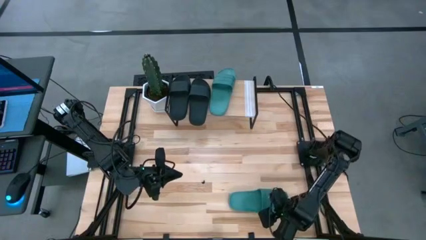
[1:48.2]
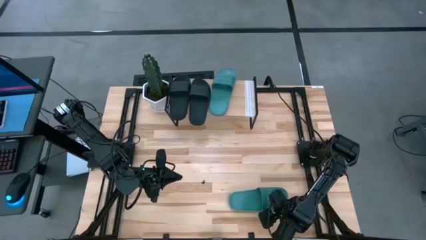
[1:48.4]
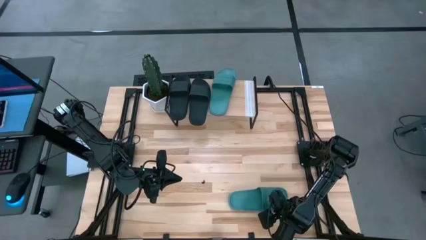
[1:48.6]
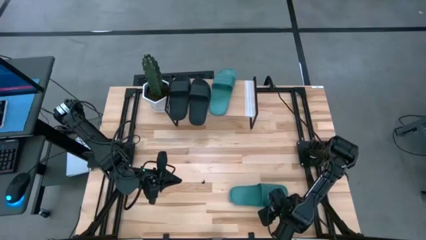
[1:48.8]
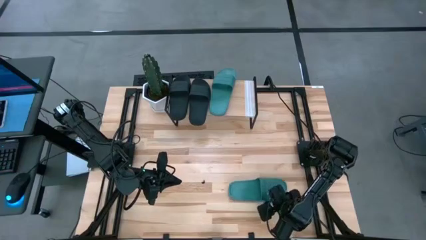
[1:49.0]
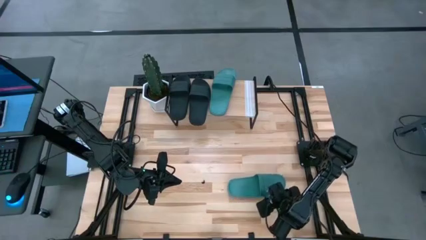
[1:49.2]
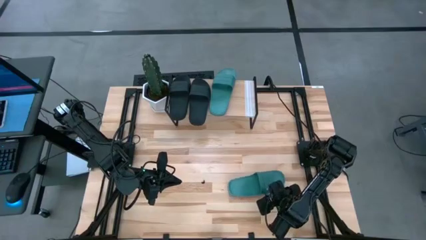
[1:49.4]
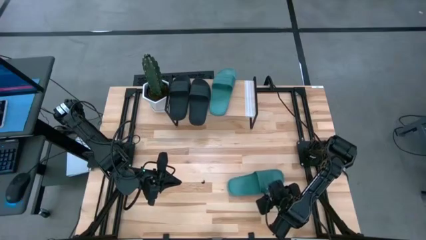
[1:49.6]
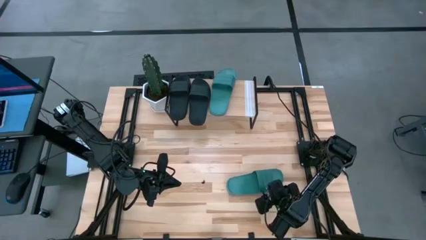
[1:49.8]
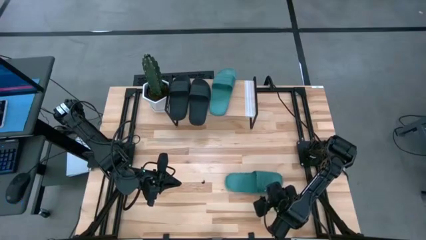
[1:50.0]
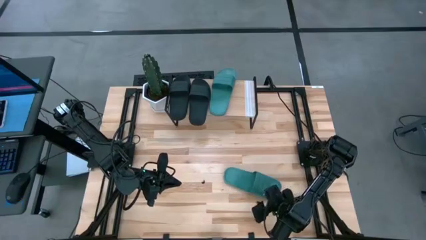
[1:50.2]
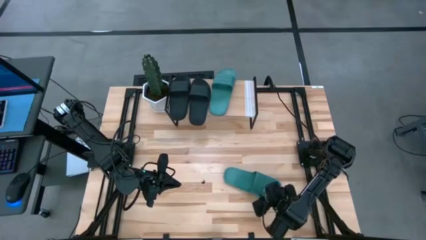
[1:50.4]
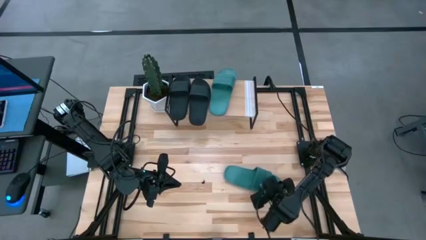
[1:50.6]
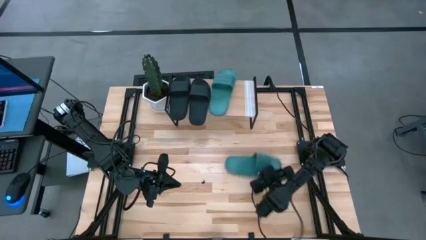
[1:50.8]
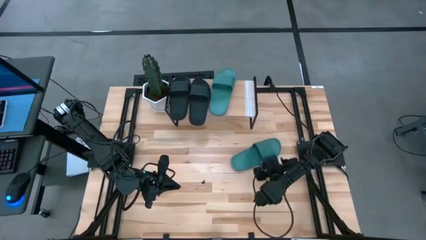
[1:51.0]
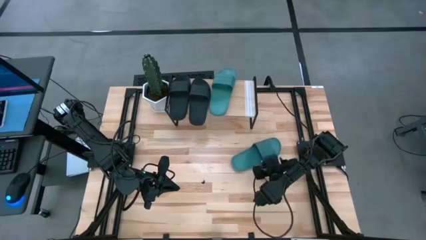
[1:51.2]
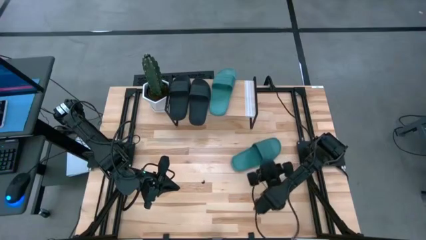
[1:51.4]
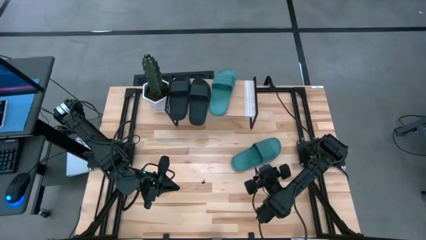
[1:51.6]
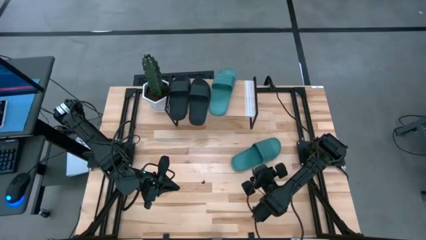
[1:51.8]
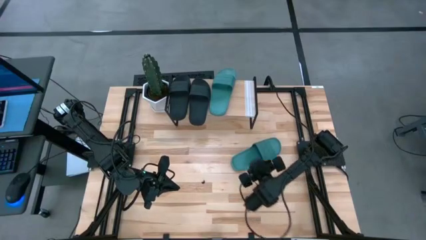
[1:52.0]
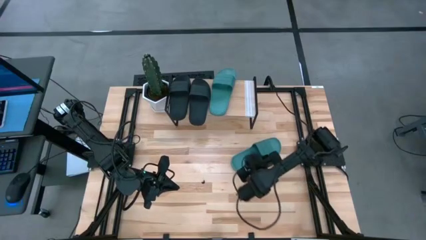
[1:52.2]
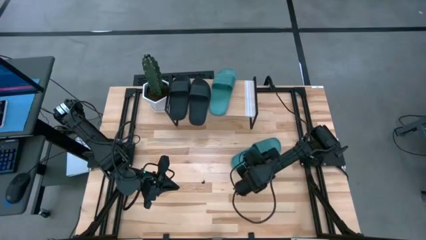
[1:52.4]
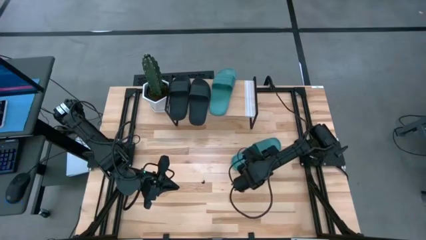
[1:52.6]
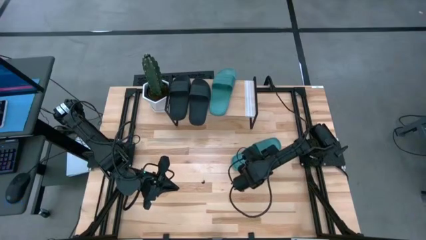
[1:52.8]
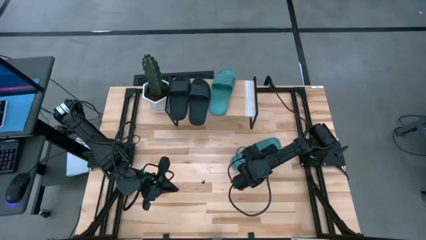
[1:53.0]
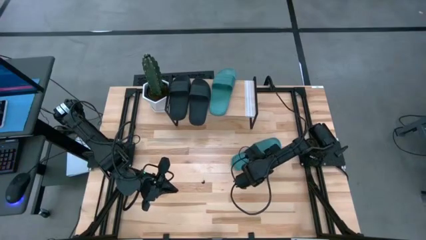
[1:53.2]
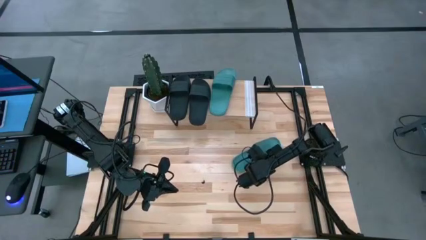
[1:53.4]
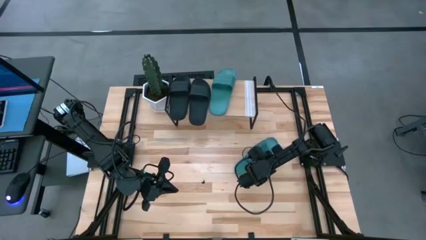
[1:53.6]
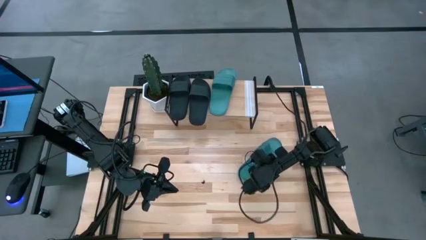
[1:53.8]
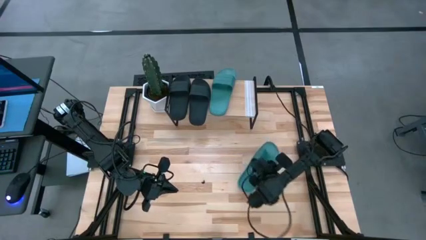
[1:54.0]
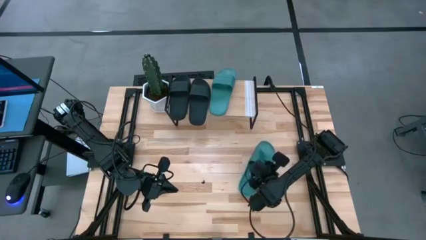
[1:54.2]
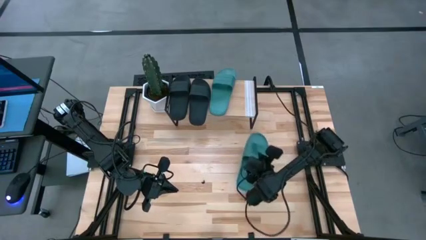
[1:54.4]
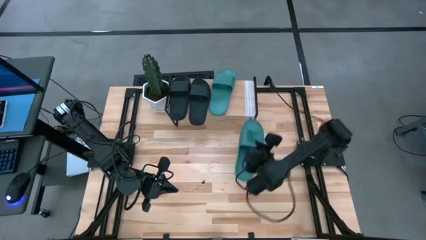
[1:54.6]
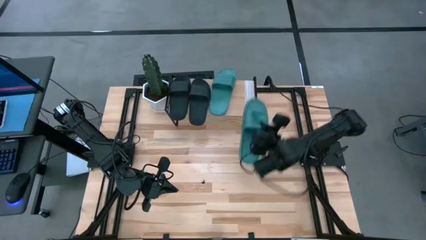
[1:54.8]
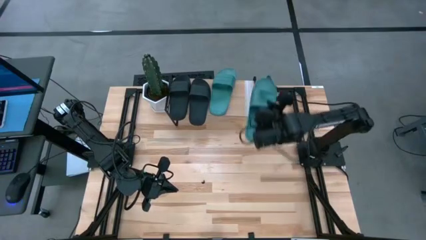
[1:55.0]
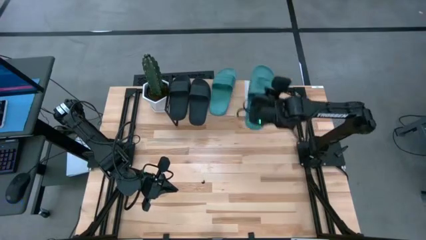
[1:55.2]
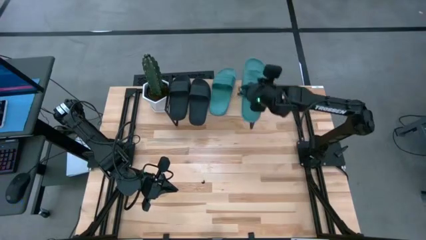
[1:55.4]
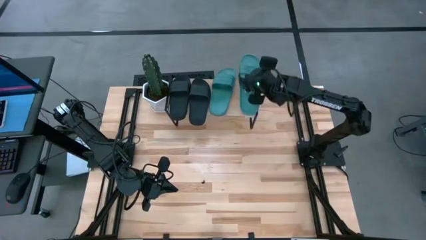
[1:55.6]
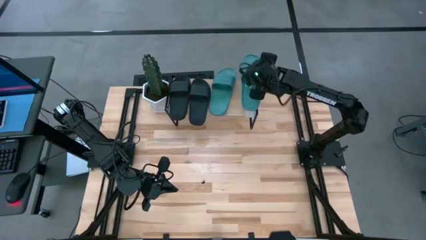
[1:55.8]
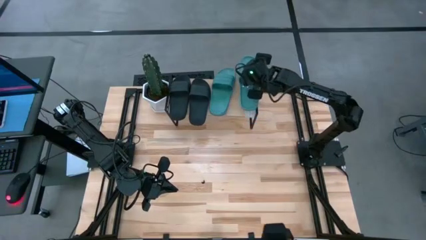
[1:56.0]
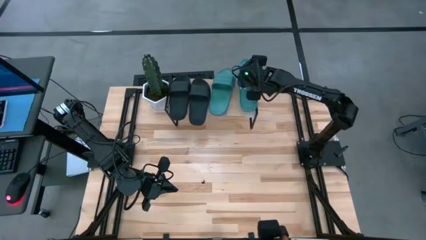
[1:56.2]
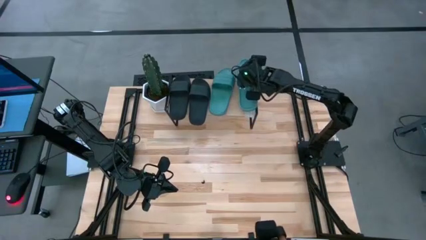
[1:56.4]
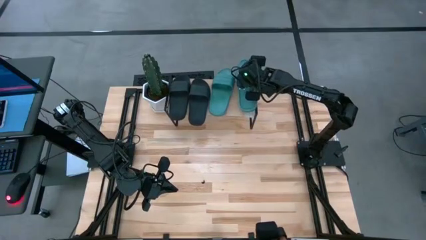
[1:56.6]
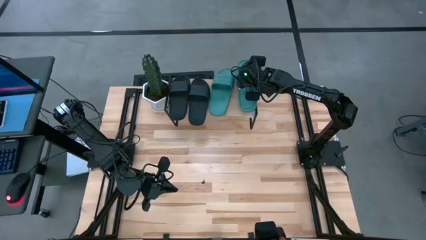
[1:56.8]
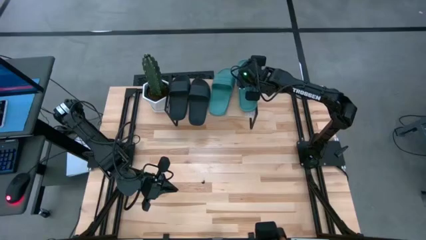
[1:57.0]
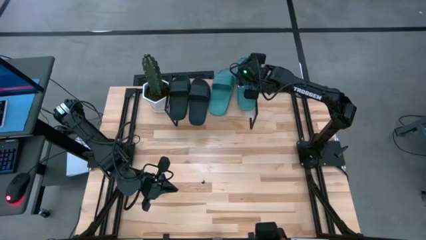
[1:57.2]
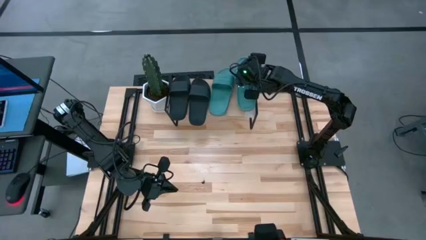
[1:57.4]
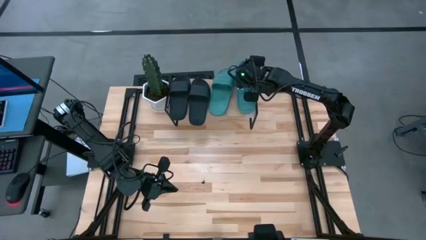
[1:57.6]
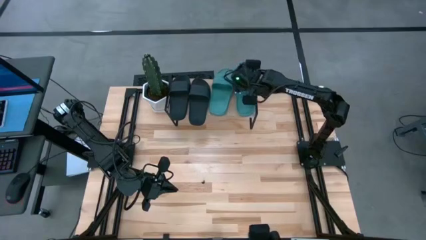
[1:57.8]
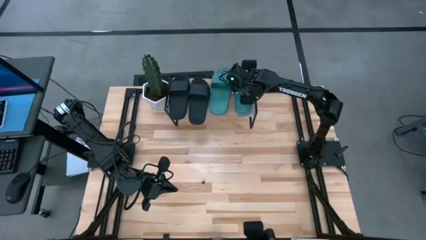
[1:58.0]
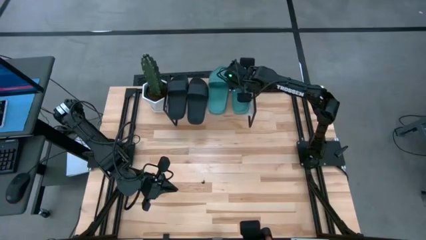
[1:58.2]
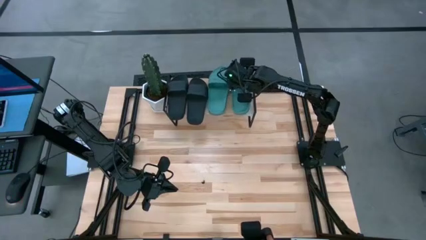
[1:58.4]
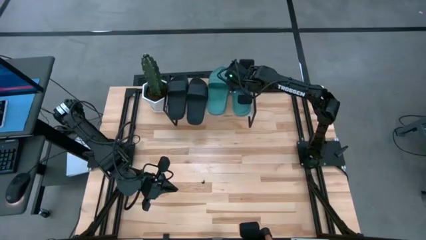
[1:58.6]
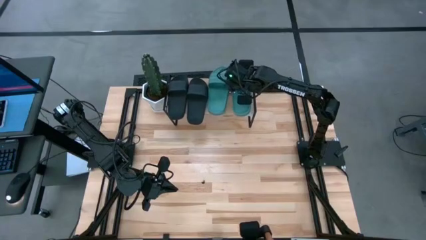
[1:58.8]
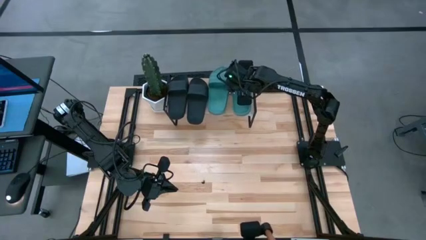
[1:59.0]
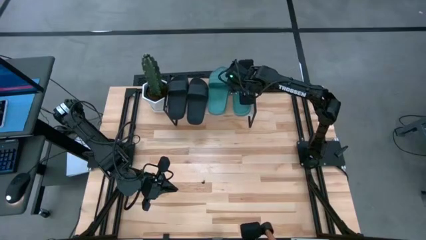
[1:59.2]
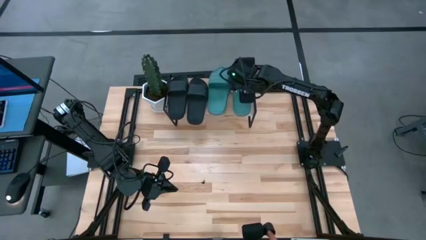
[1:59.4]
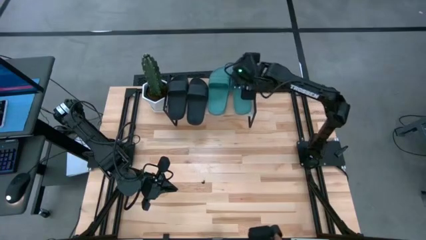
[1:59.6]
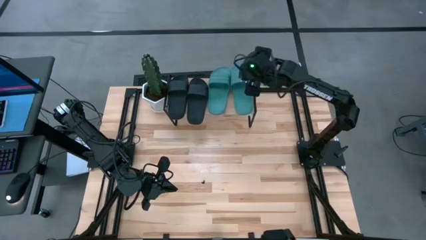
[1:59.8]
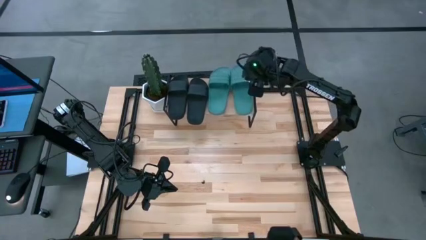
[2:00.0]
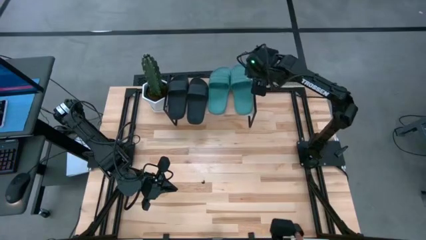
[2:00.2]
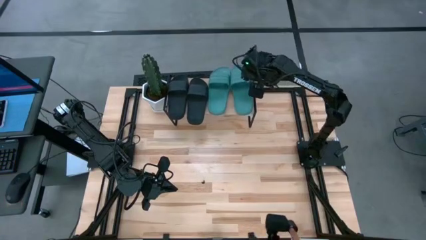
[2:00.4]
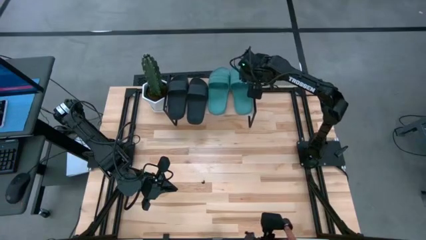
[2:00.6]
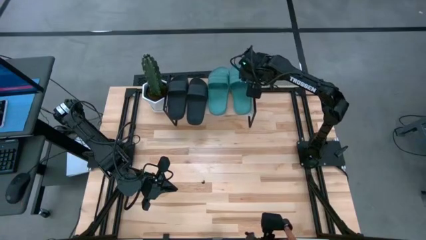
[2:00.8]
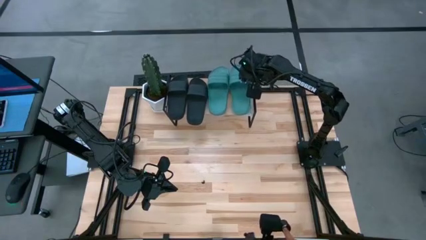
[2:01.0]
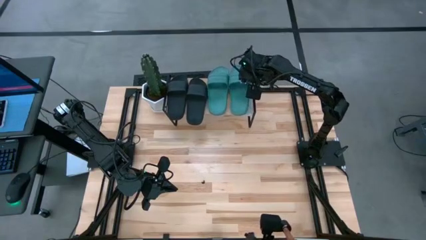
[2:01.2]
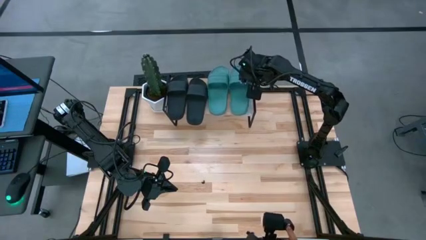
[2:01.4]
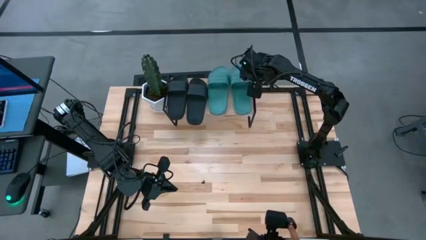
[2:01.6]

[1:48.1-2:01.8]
Task: Pick and place slides into the shelf
Put the green slide on the shelf
